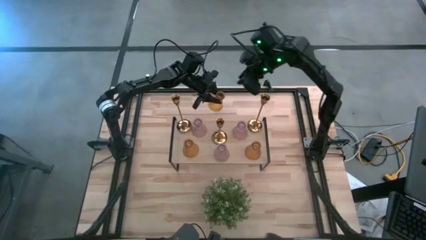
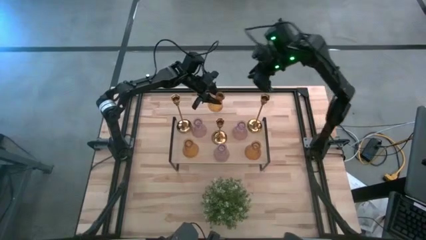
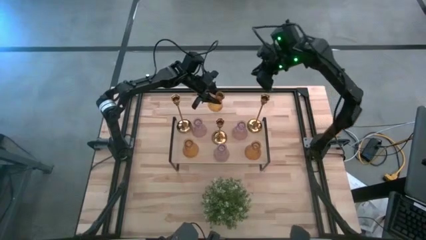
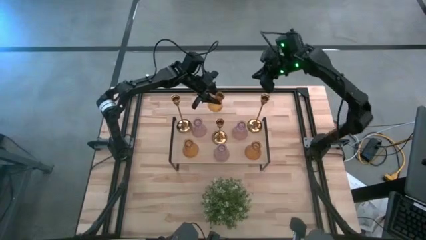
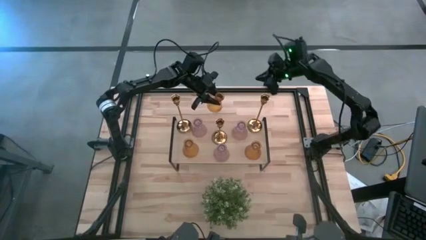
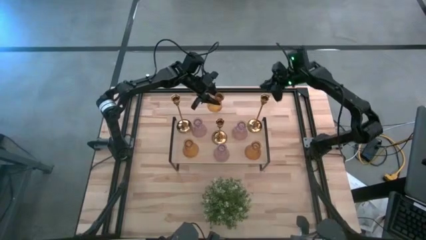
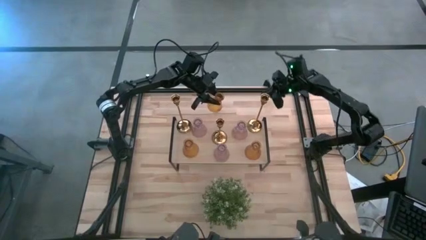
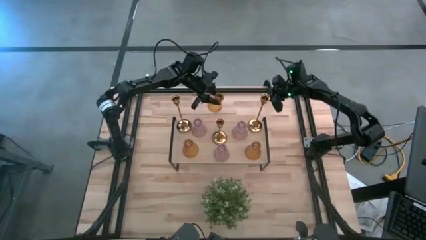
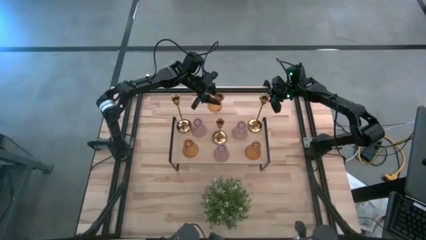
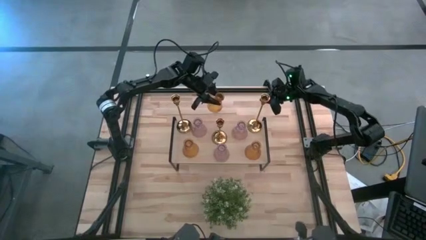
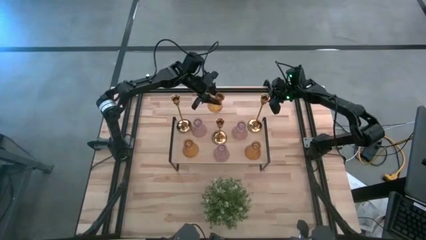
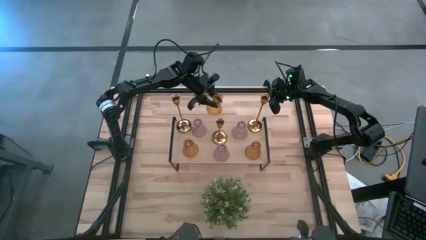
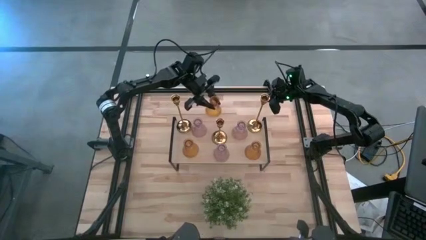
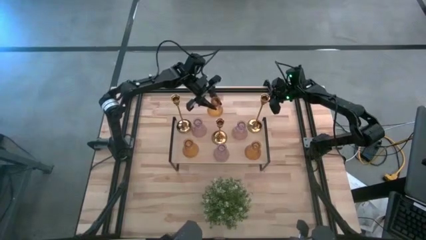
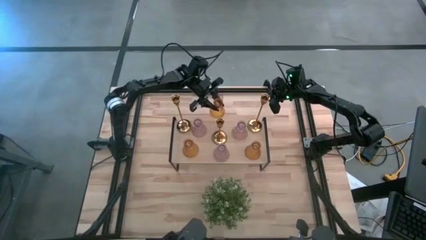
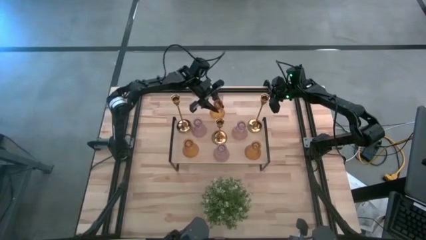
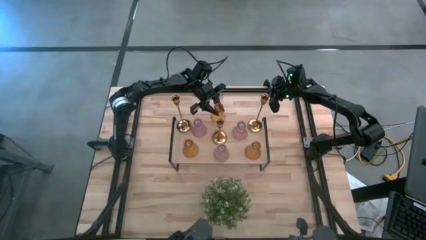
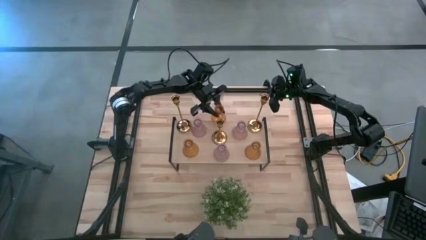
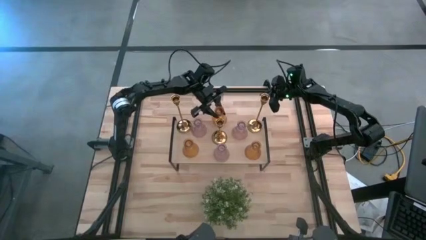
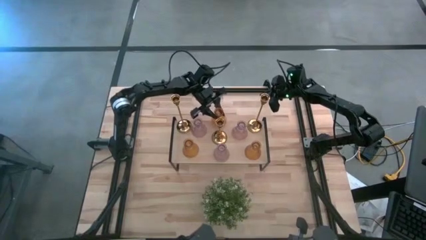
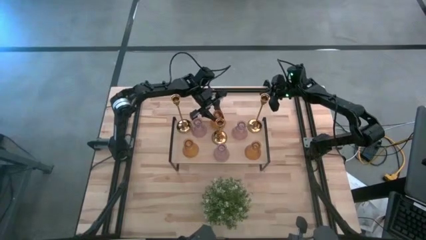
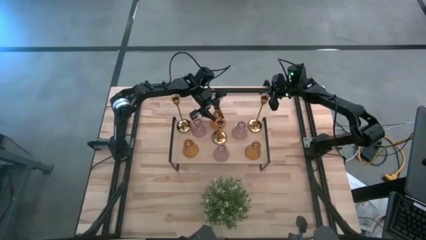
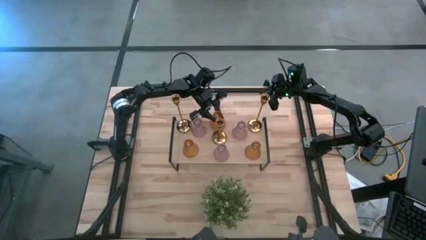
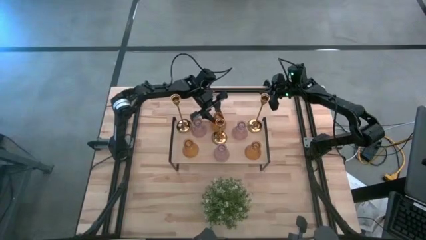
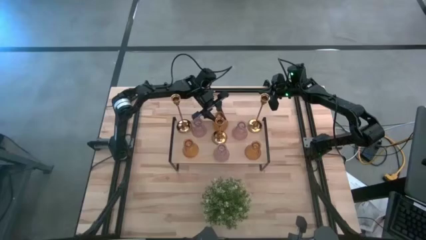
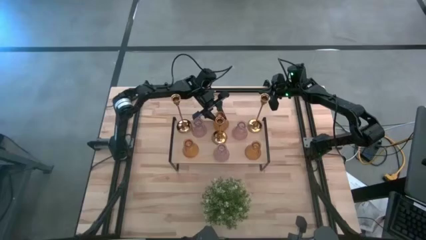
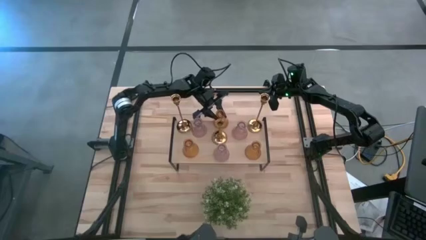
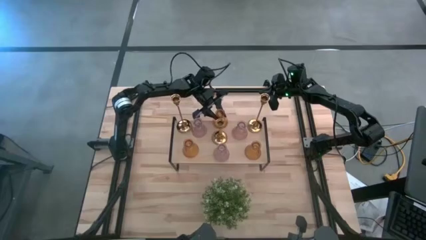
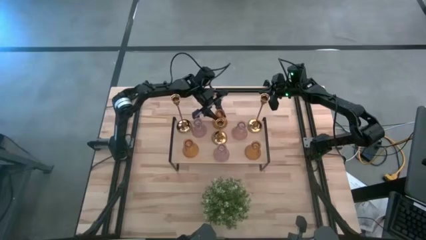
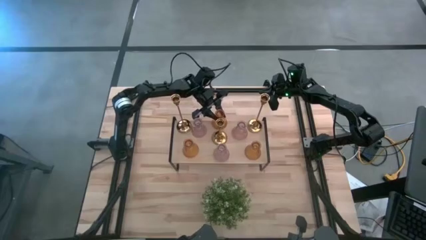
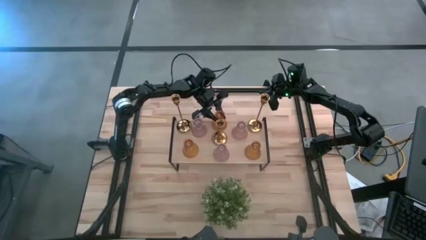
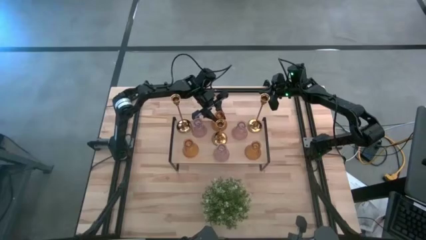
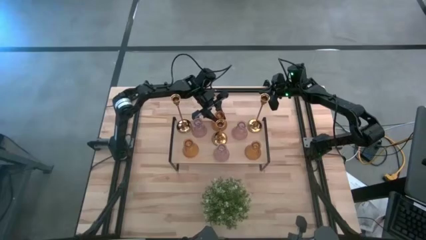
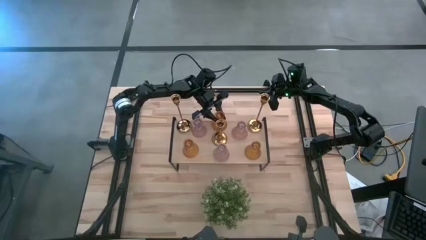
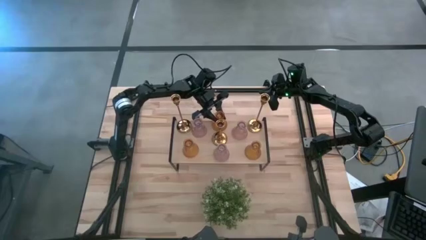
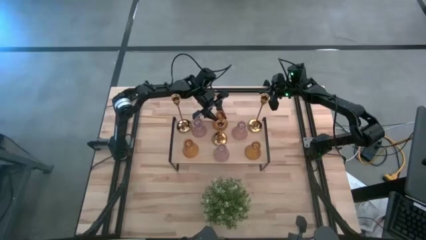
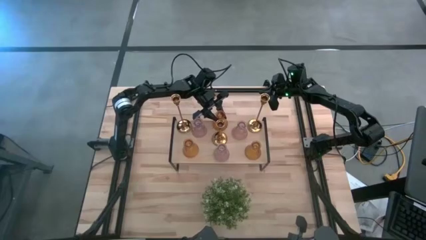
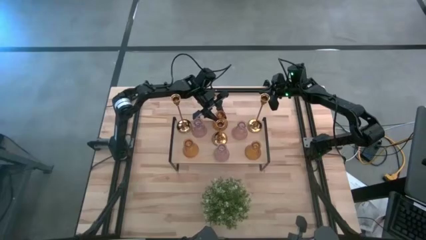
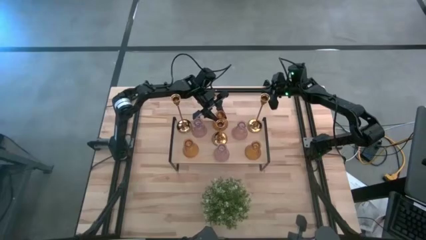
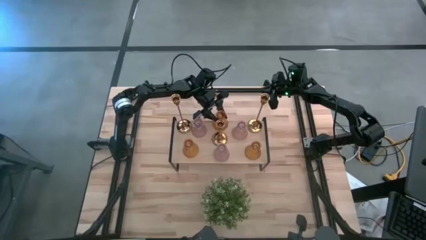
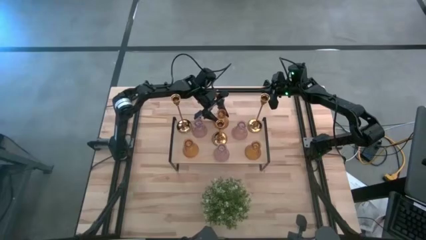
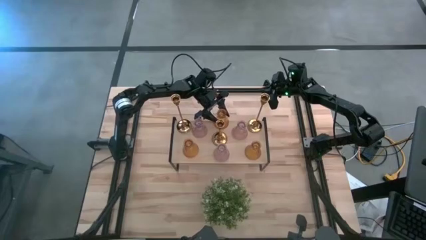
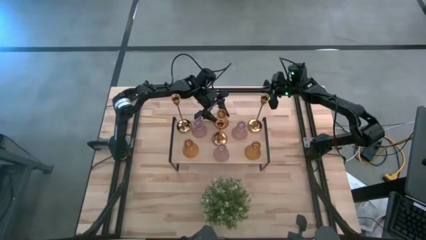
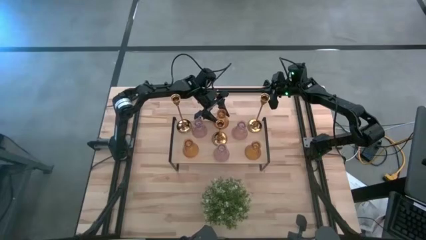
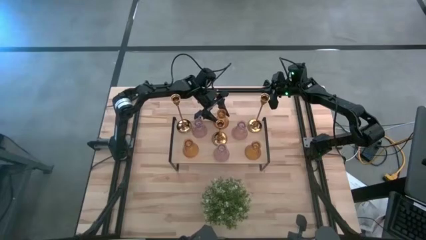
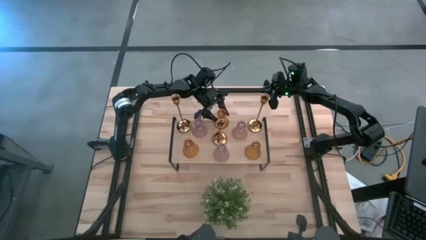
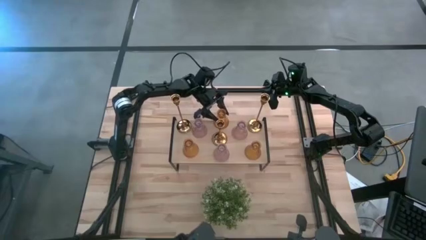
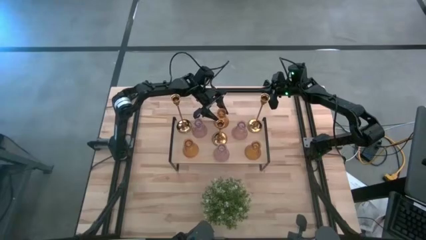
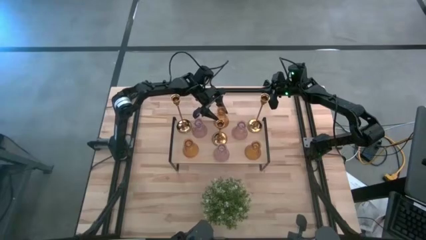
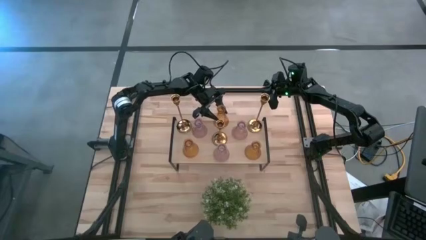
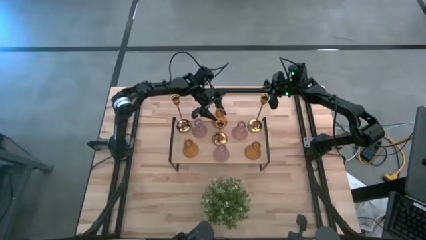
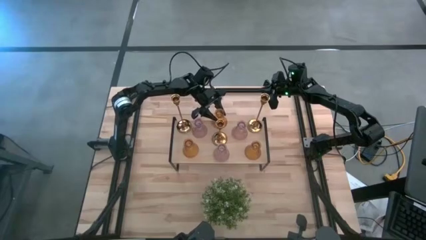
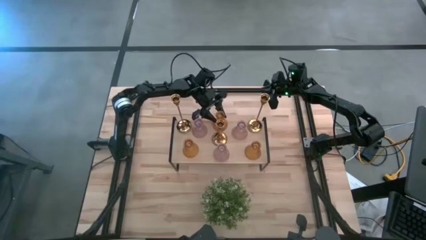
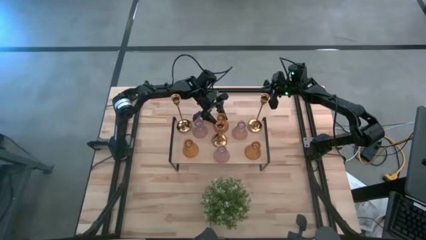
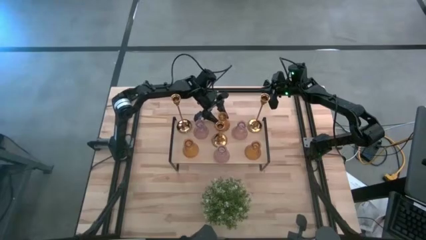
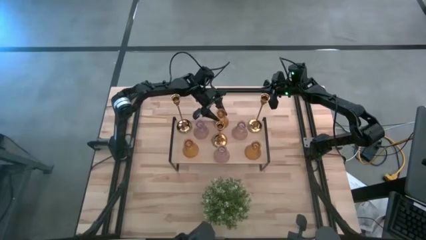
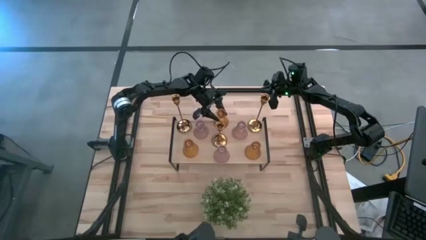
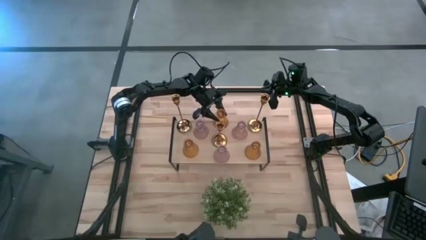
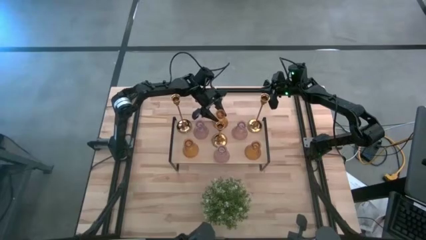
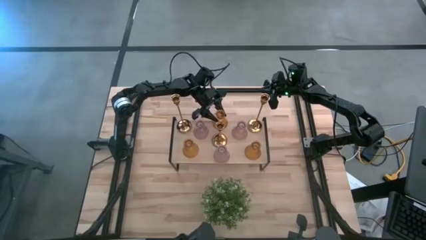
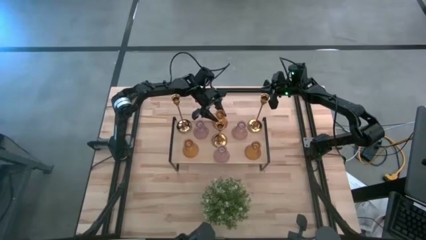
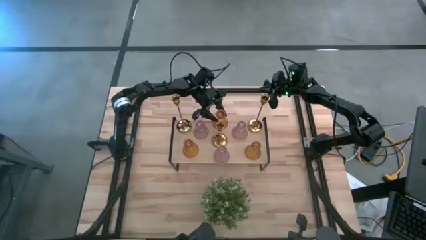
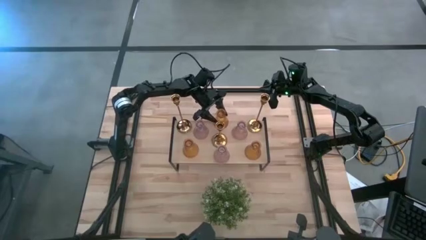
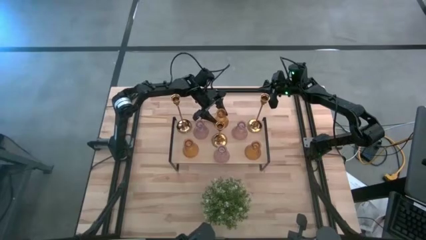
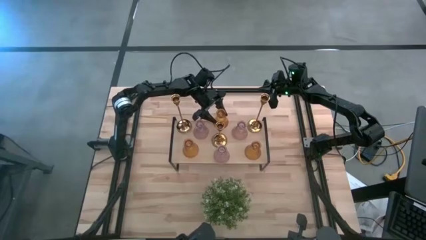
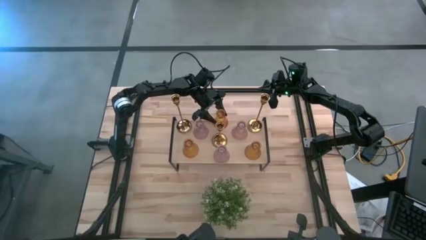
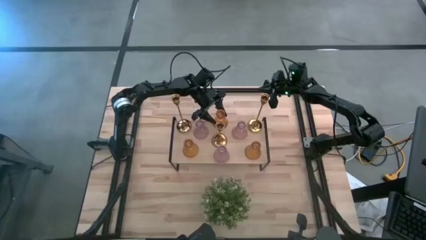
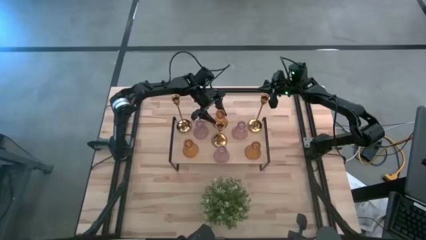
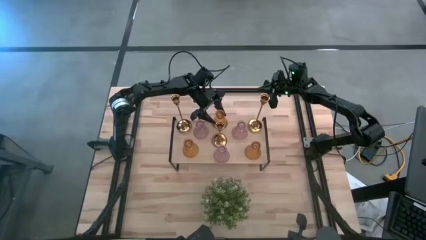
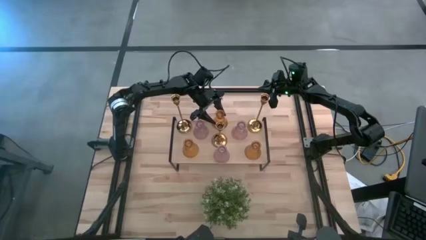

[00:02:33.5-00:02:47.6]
Task: Pick & Place candle stick holders
Put the yellow vase on the shelf

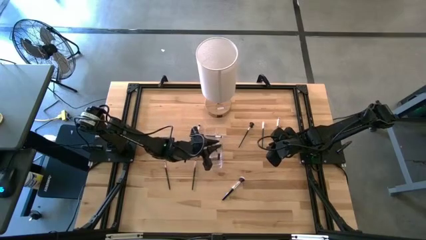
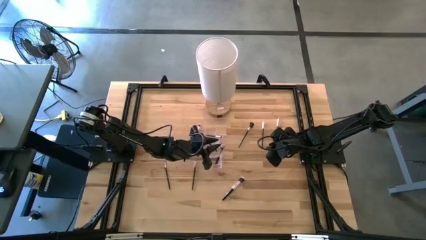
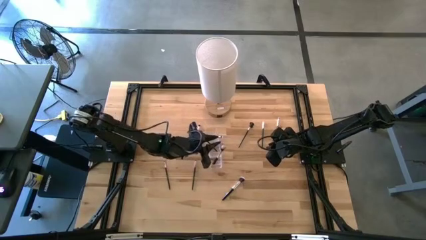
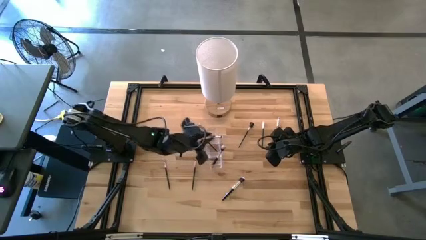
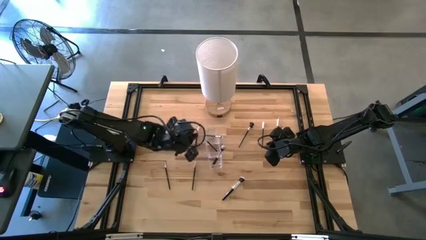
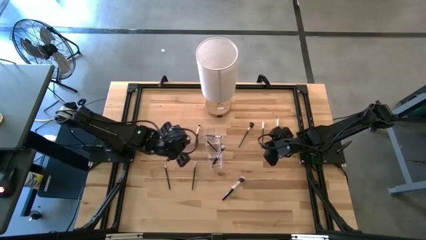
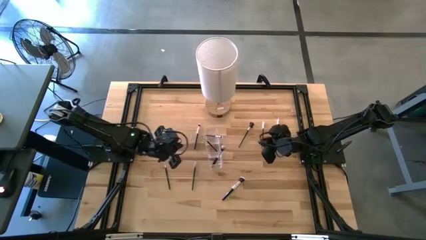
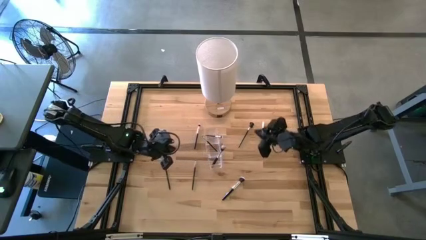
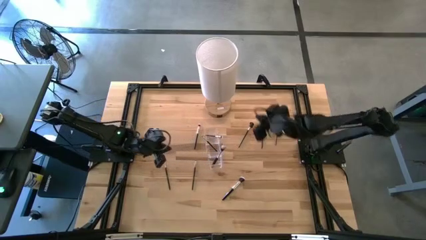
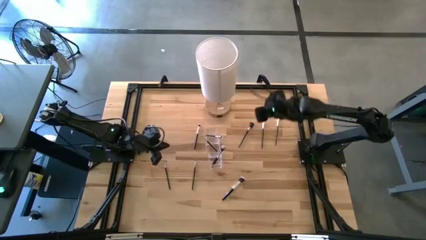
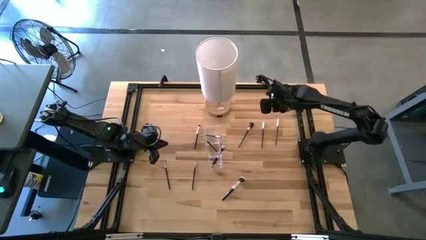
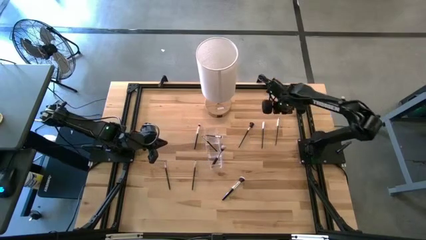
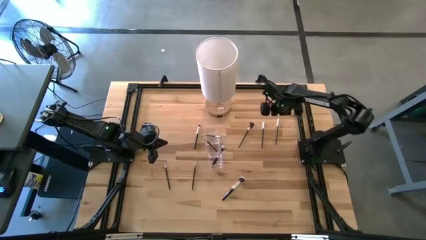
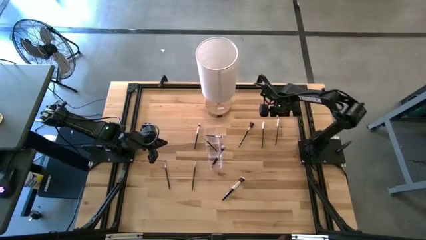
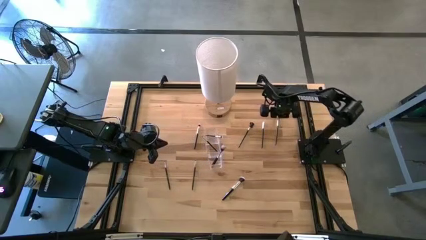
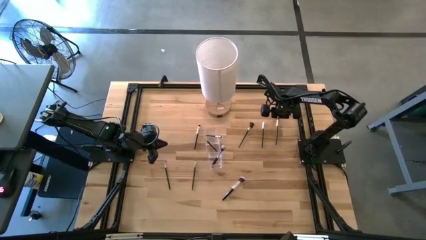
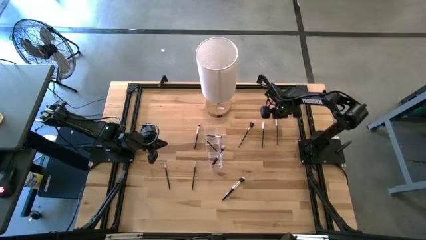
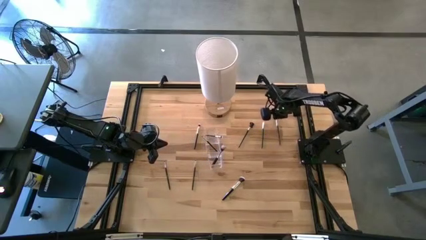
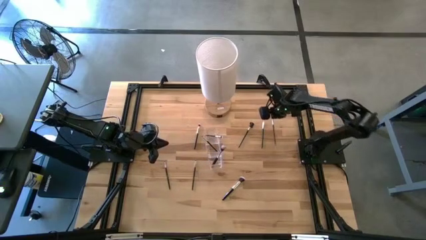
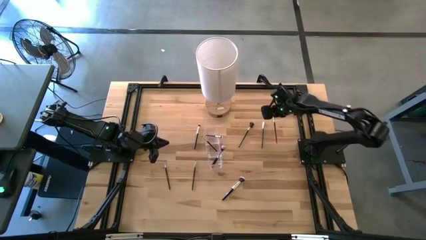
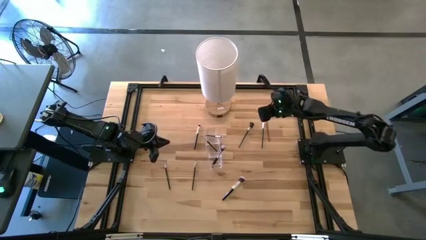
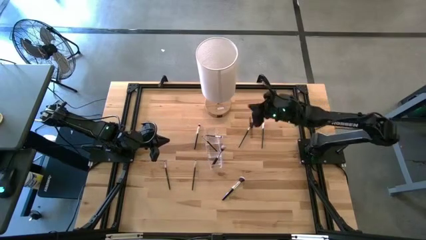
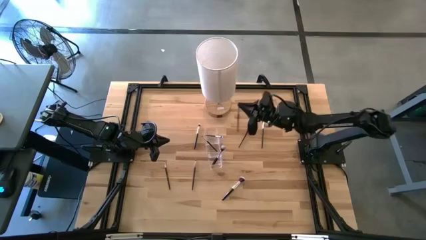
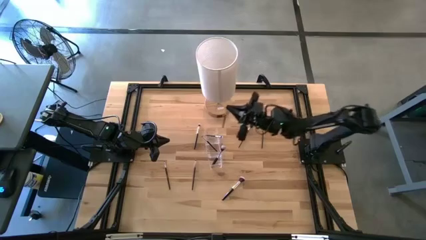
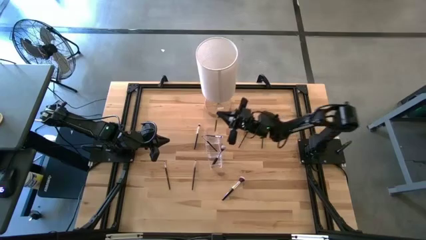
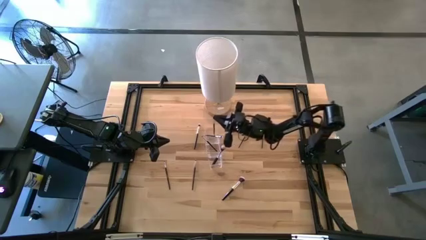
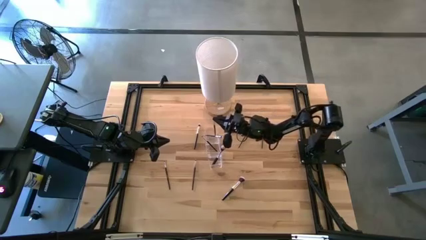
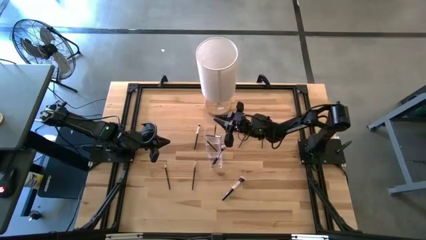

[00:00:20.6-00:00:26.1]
Task: Put items in baskets/containers
Put the black eyeshadow brush into the transparent organizer
